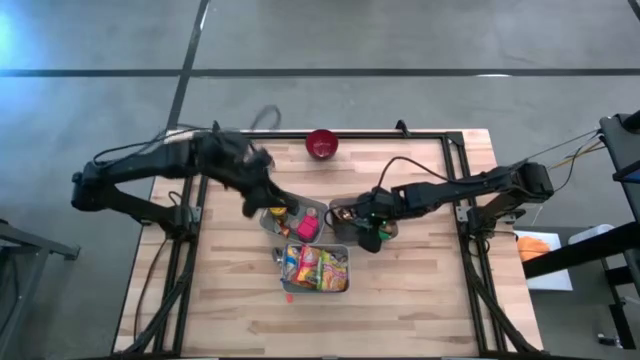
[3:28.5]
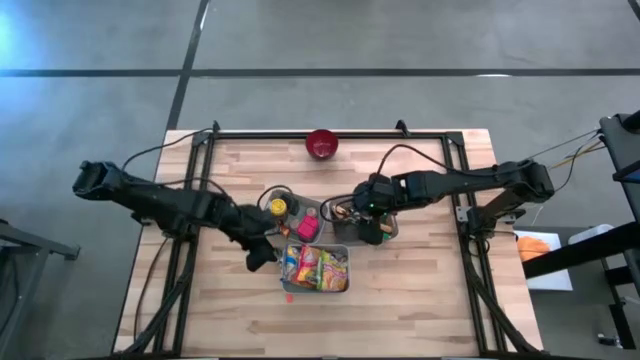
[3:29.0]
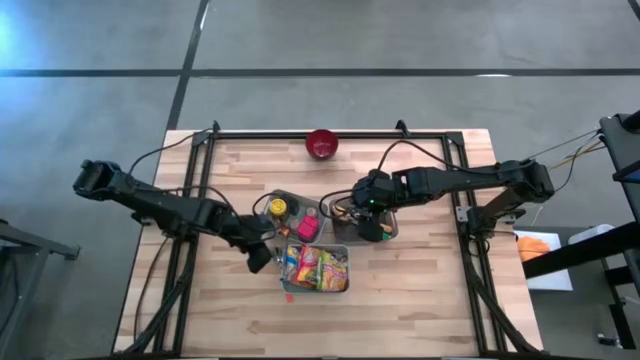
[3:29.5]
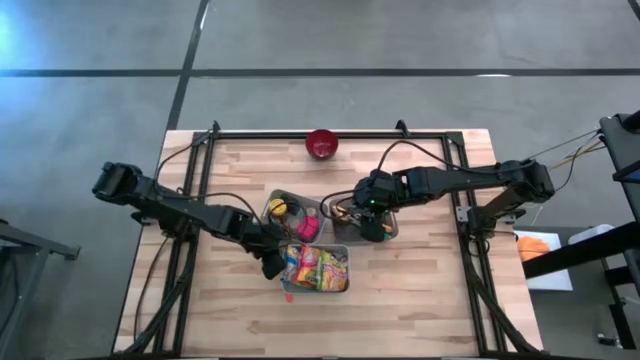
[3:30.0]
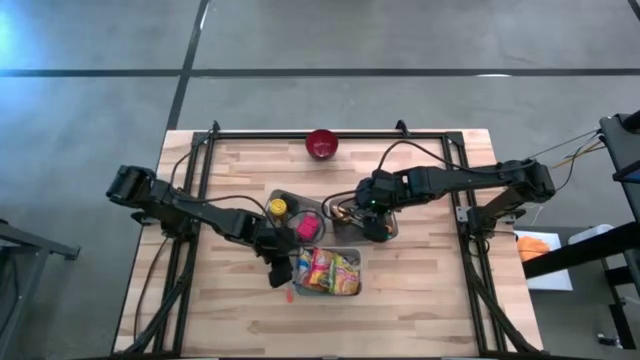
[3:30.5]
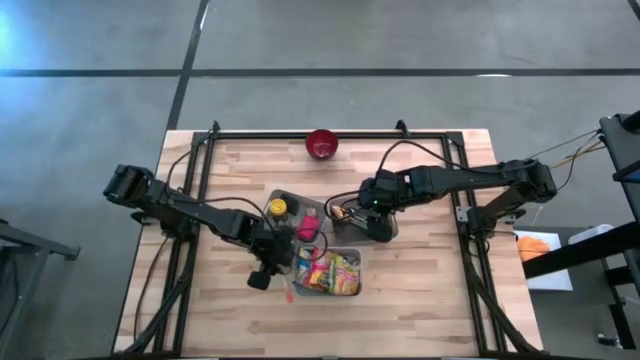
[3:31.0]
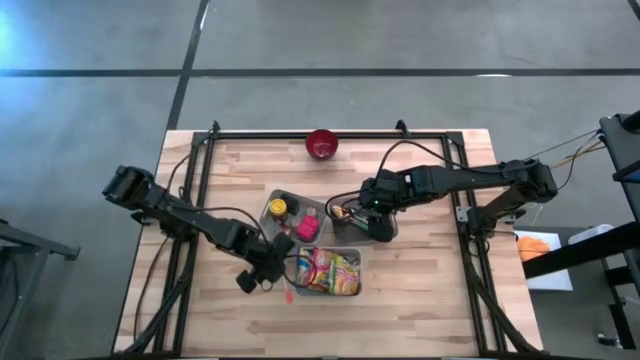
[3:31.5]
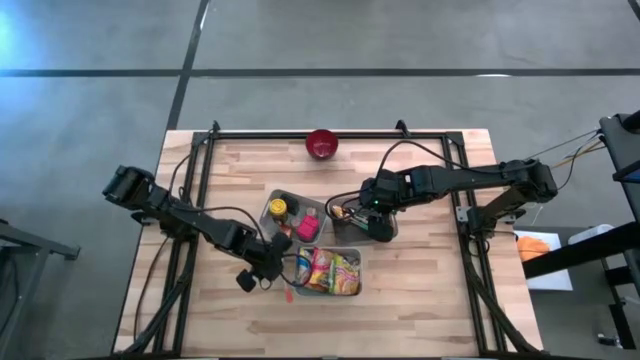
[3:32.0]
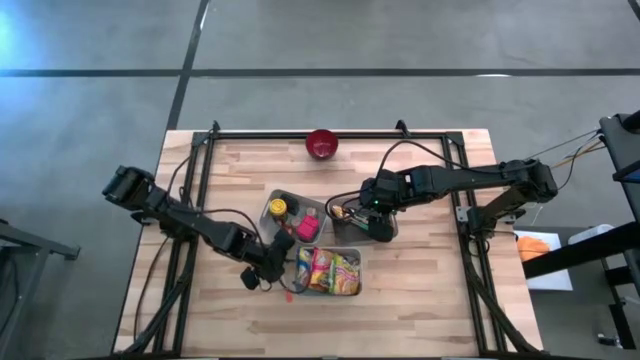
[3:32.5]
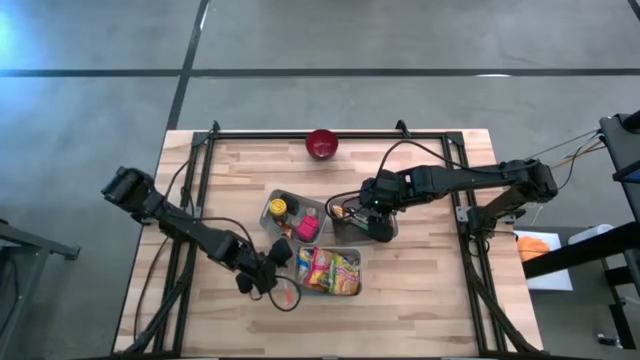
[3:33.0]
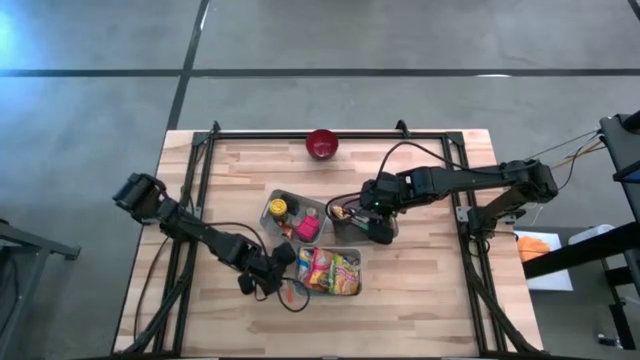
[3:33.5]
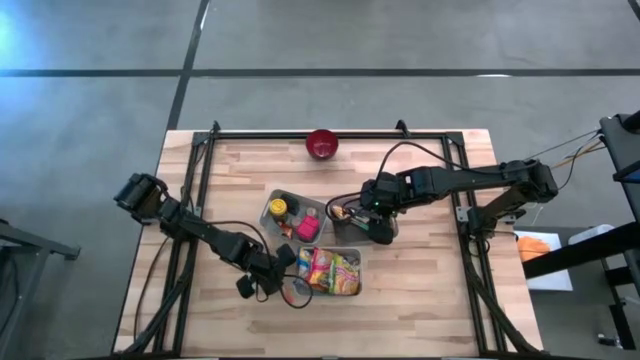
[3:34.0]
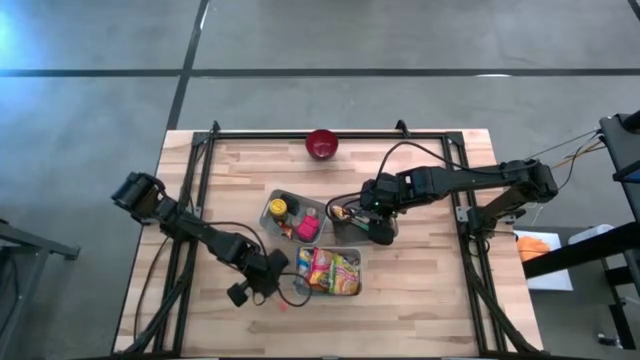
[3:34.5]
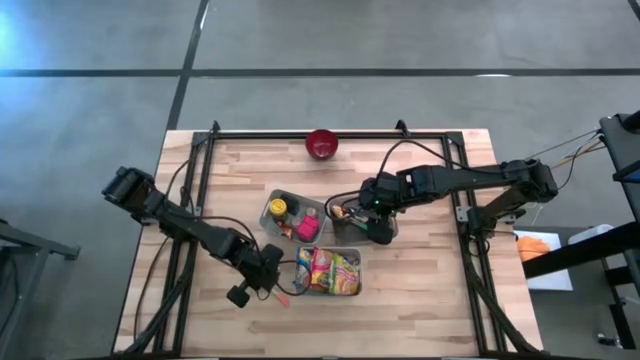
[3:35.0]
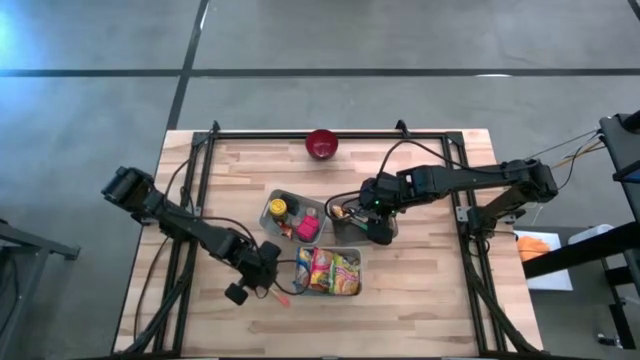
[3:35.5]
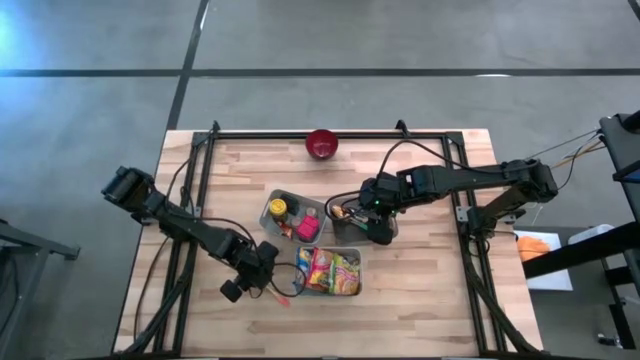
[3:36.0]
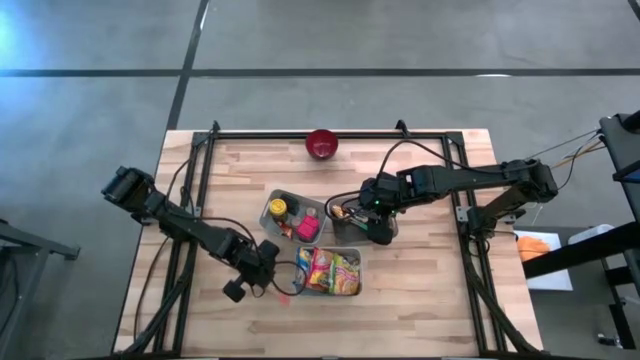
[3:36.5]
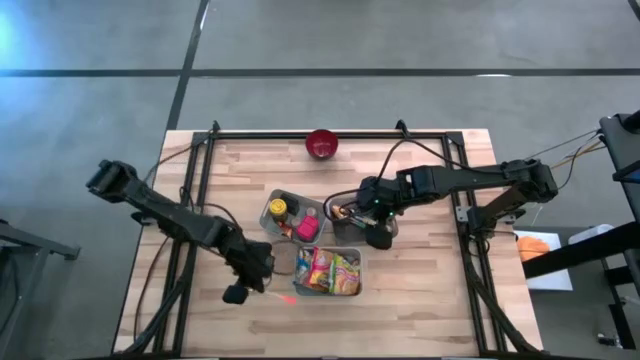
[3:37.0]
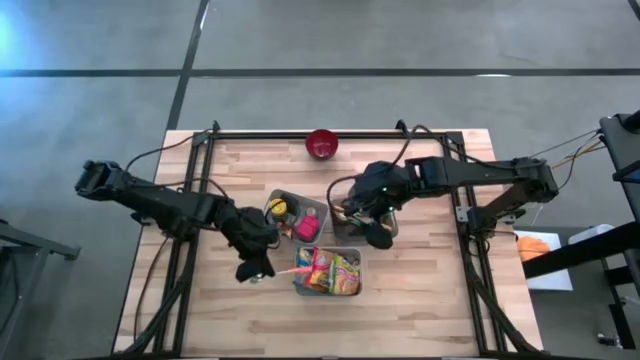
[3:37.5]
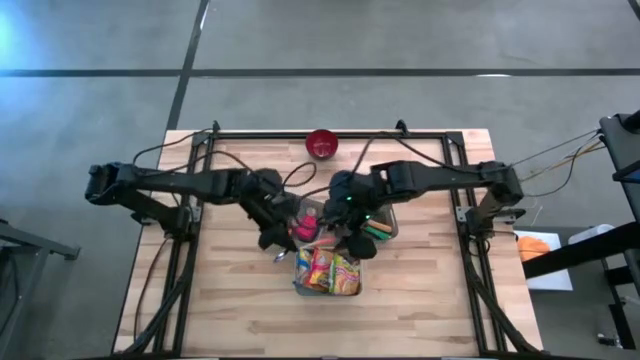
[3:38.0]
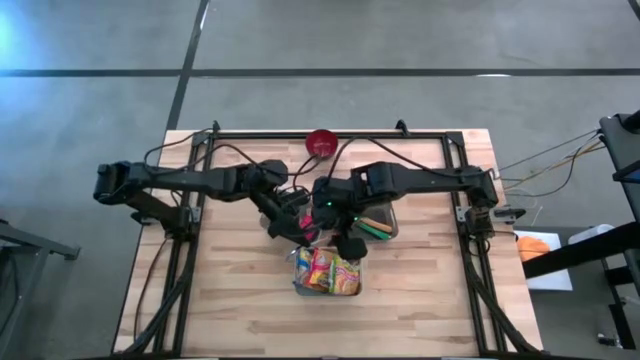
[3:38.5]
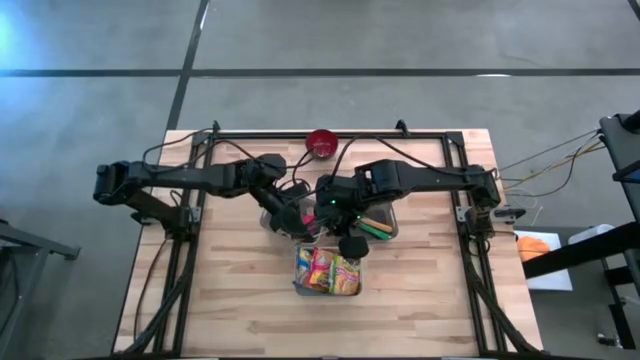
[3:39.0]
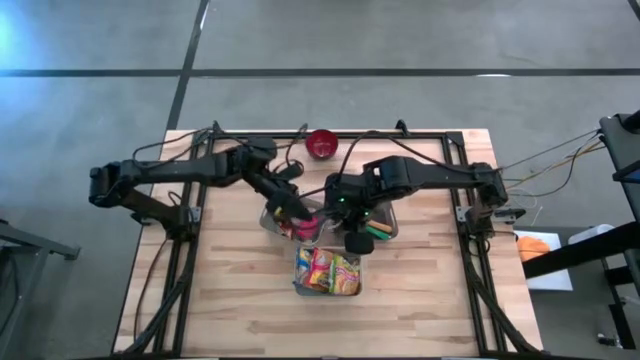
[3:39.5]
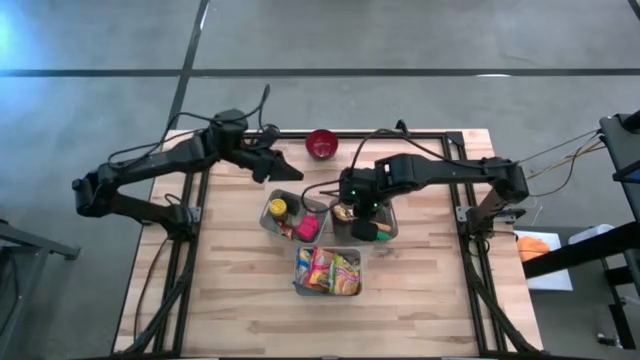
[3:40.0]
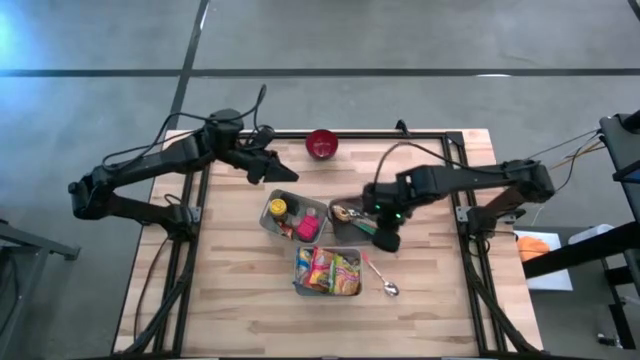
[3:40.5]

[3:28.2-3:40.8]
Put the orange spoon into the black bin
